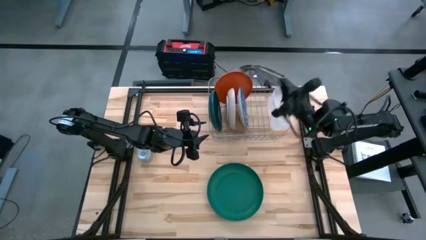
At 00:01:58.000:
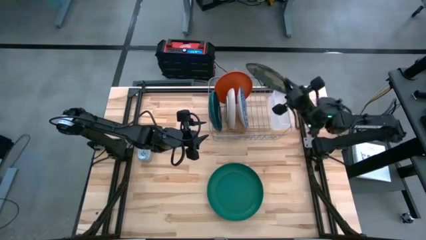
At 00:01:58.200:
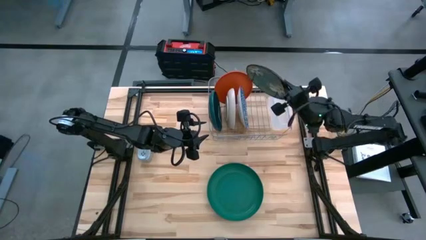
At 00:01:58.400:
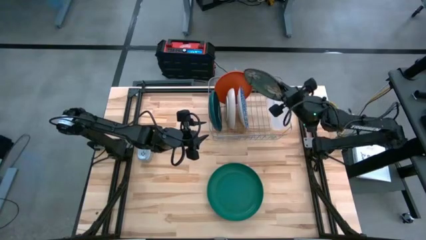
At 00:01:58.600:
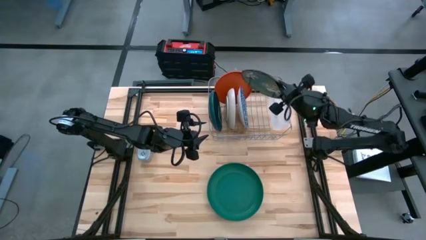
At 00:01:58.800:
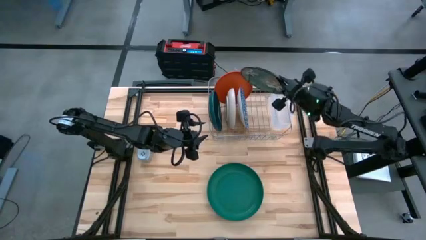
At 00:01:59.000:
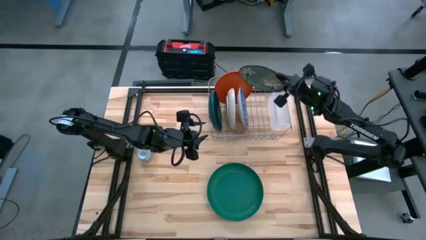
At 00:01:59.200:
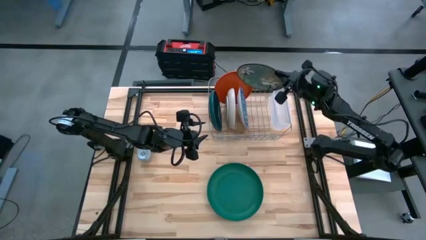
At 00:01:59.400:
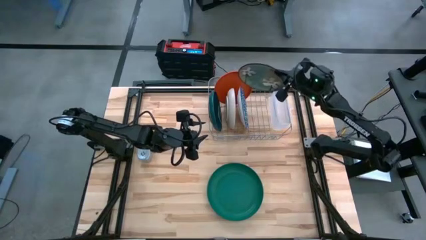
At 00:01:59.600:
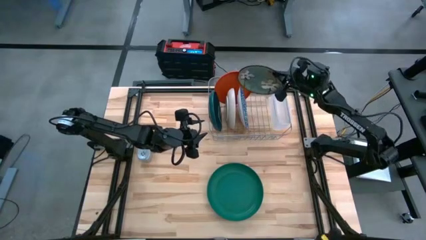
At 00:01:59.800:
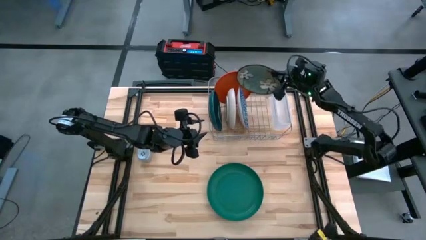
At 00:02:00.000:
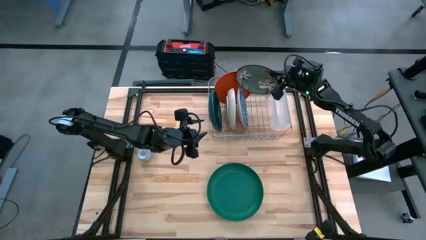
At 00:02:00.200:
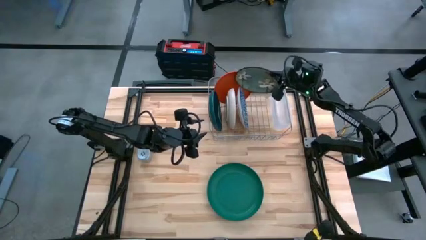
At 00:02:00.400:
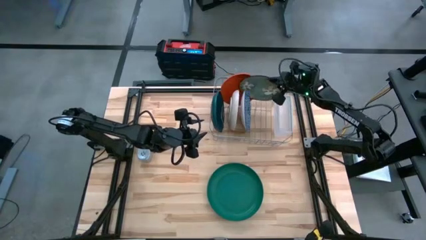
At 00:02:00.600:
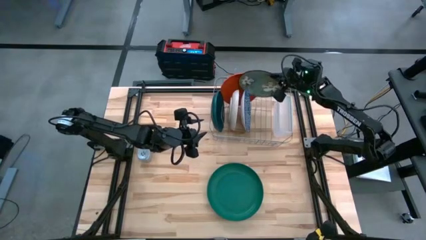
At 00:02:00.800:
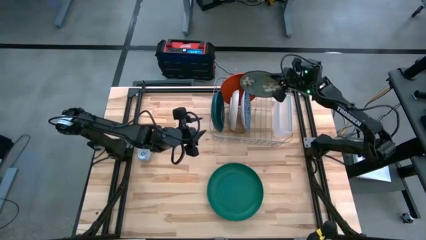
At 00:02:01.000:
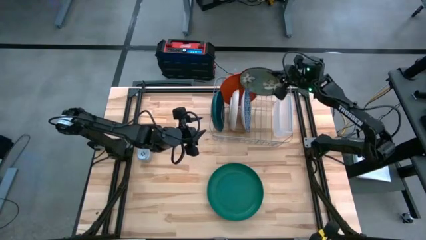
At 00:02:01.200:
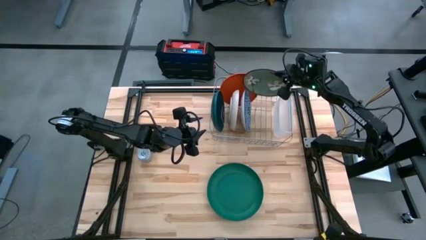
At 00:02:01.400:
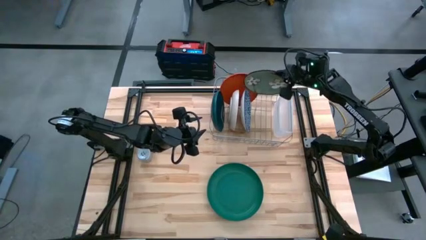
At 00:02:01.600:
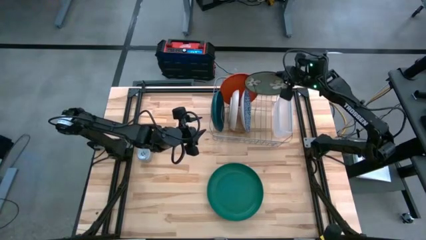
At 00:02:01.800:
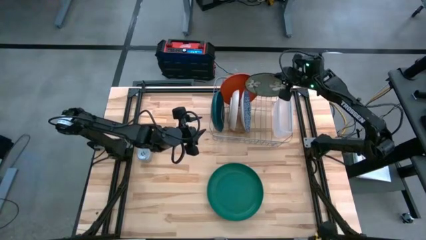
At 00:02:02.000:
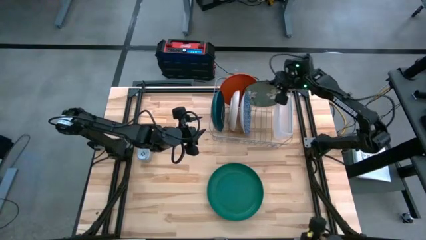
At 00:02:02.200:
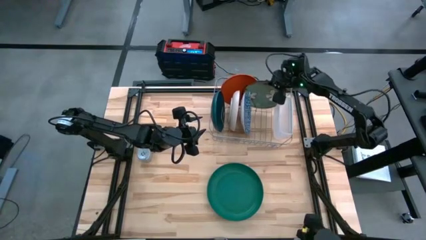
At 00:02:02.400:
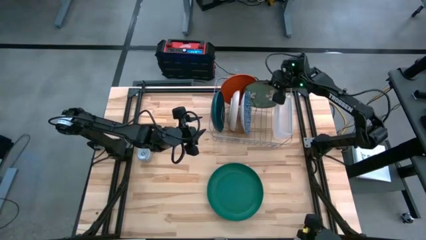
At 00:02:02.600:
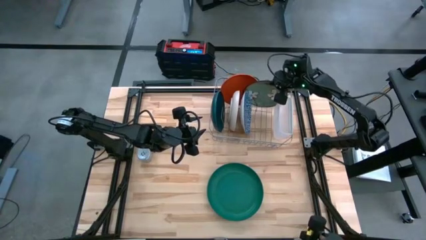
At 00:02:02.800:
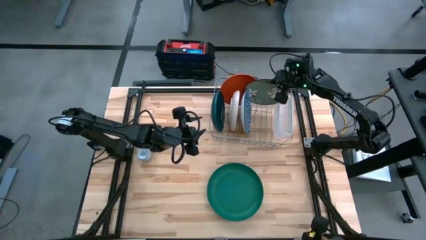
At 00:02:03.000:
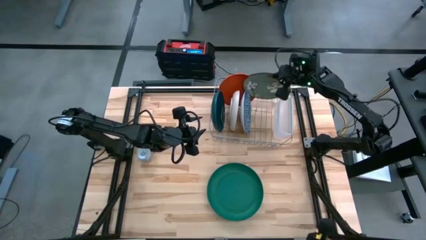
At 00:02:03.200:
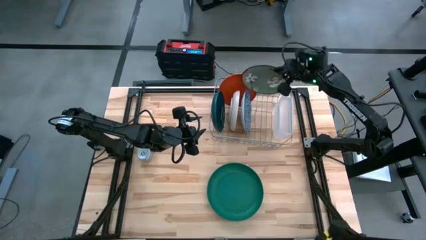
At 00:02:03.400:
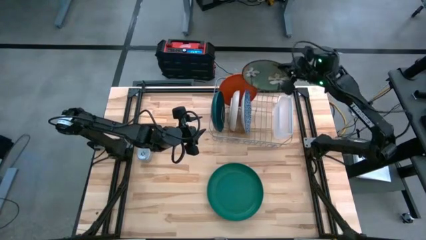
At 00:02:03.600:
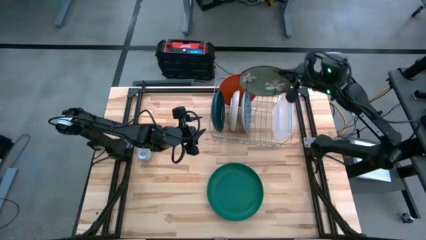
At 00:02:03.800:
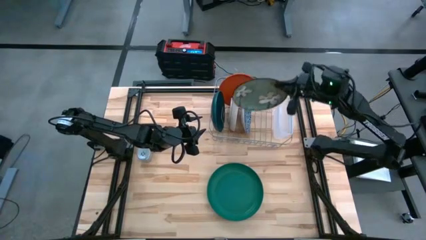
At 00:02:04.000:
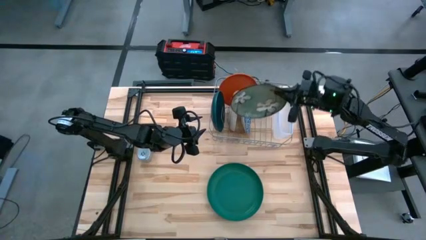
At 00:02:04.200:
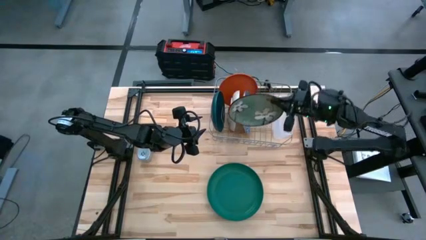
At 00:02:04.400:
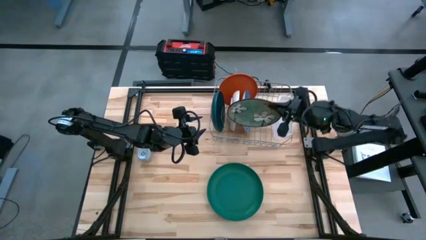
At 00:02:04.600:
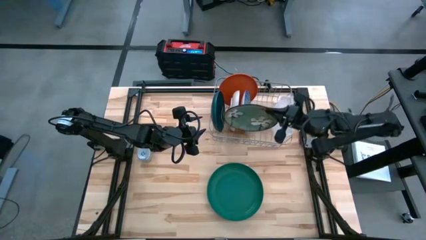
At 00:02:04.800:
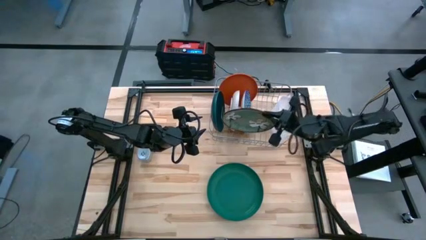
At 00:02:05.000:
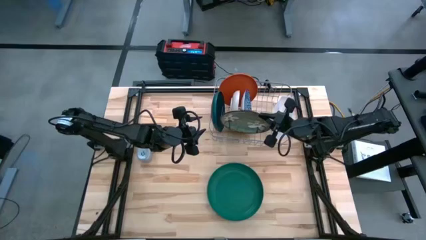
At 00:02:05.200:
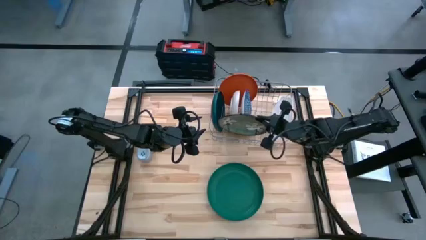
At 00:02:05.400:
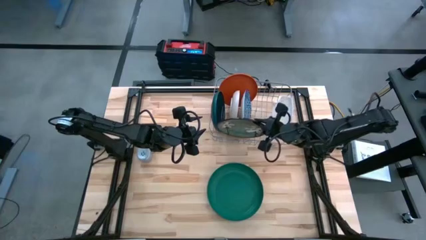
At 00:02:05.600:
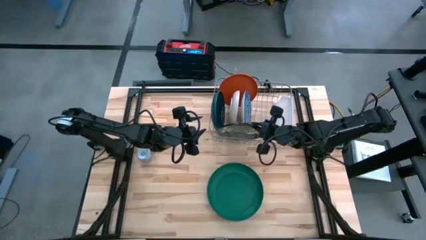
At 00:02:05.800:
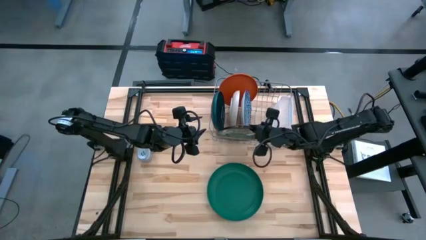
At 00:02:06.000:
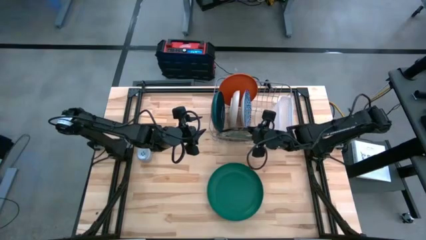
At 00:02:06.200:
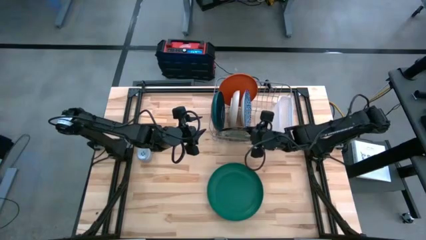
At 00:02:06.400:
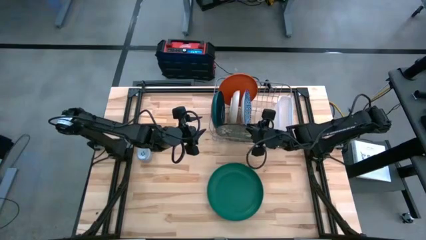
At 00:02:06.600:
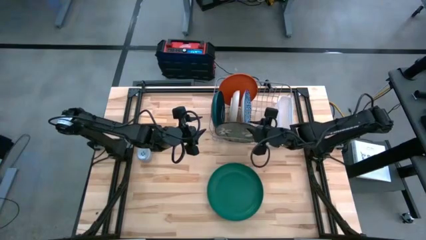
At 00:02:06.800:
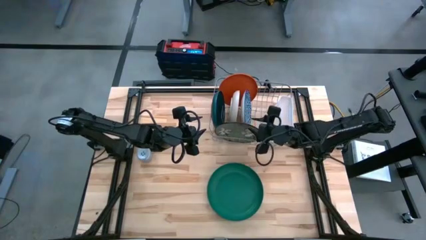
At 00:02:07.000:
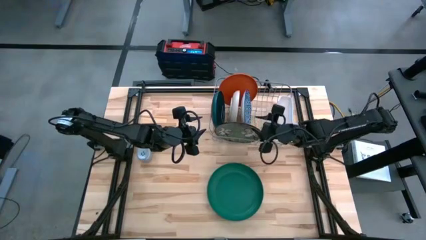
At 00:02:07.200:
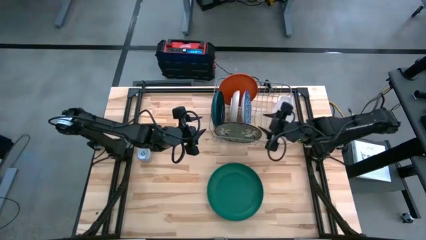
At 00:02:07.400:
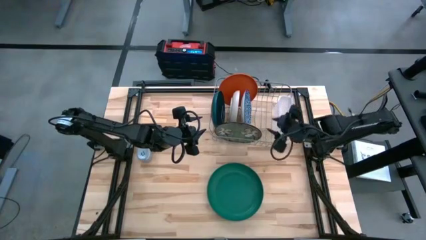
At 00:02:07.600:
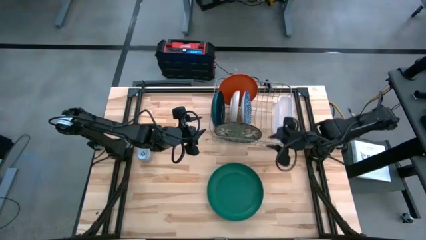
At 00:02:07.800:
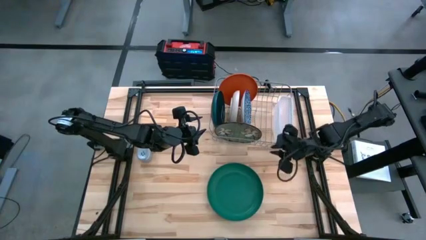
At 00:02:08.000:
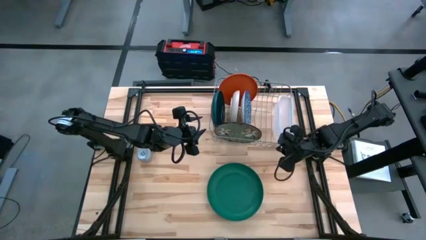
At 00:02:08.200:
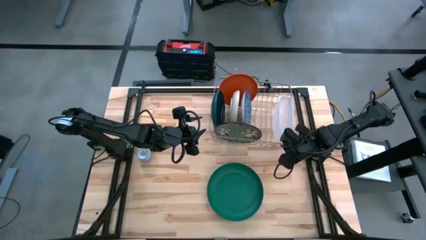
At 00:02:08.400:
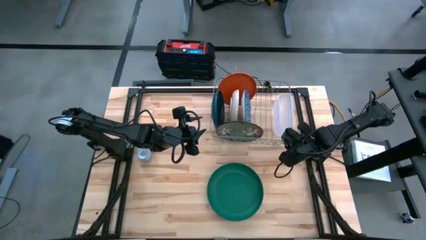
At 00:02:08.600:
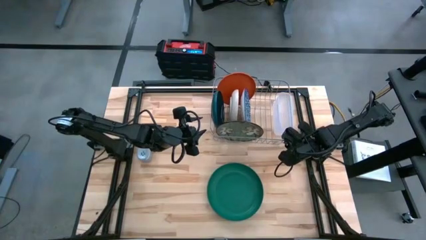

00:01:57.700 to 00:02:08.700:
Task: Sort dishes
Put the green patterned plate in the dish rack

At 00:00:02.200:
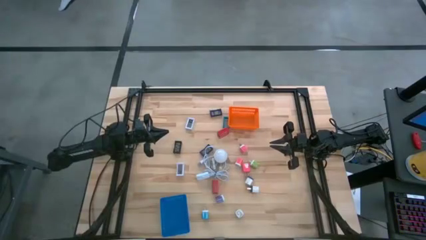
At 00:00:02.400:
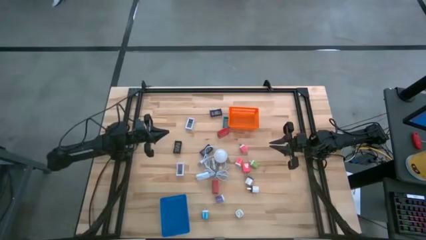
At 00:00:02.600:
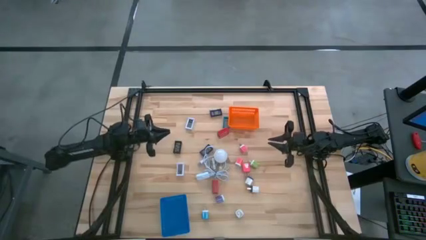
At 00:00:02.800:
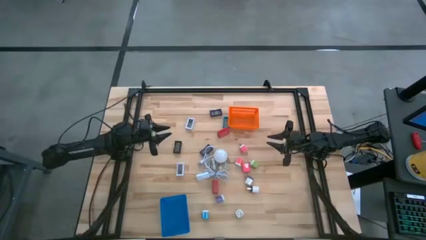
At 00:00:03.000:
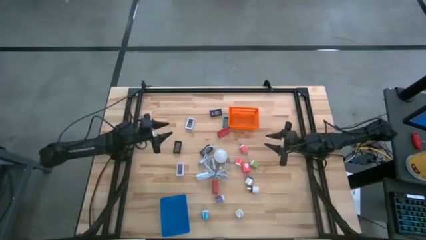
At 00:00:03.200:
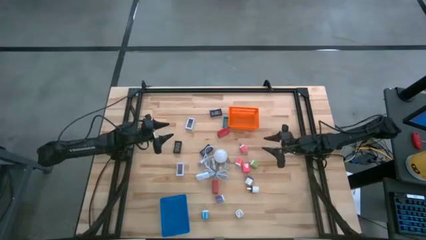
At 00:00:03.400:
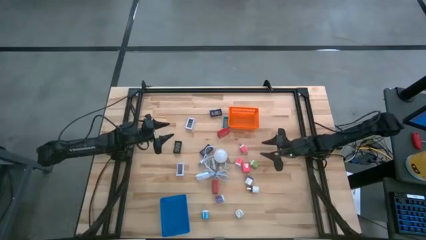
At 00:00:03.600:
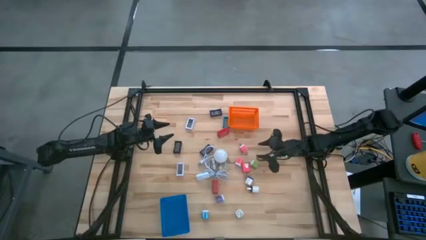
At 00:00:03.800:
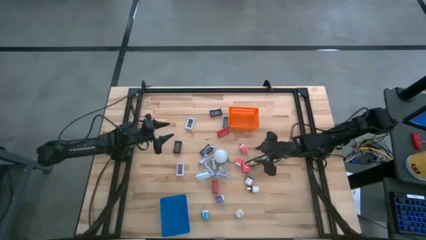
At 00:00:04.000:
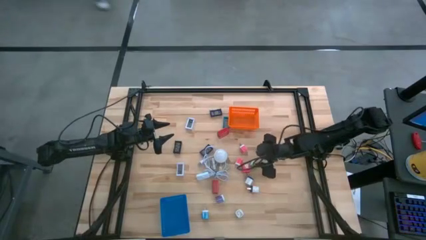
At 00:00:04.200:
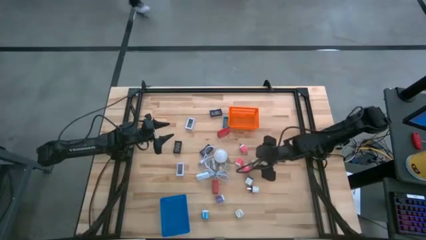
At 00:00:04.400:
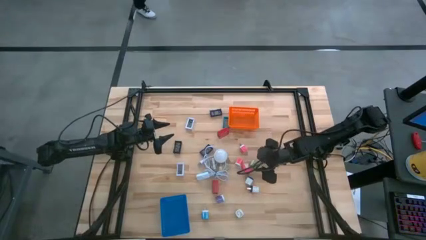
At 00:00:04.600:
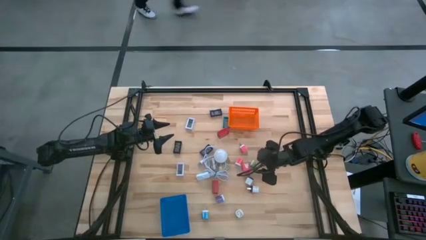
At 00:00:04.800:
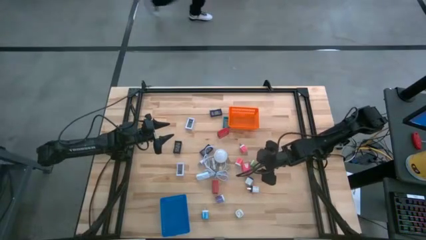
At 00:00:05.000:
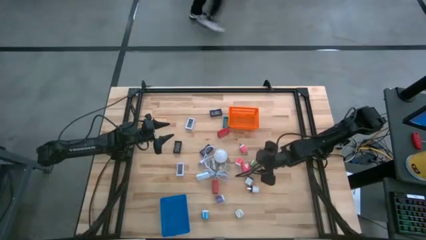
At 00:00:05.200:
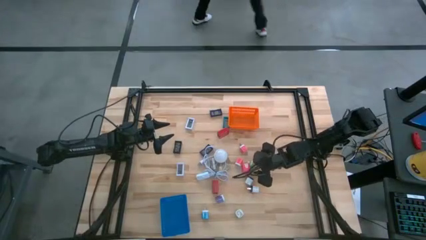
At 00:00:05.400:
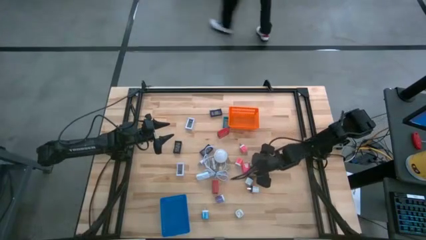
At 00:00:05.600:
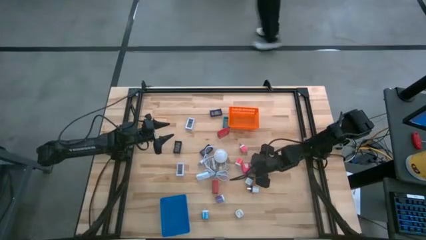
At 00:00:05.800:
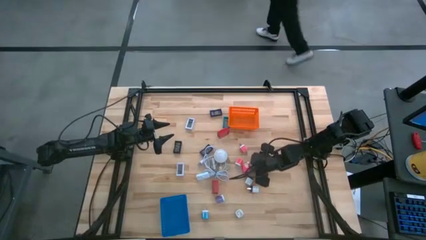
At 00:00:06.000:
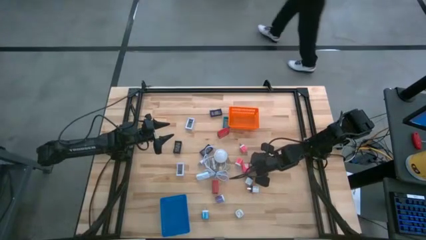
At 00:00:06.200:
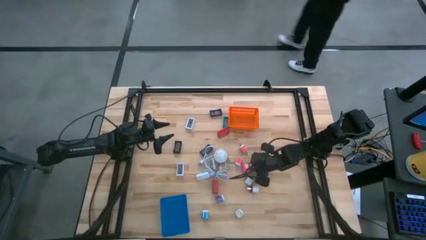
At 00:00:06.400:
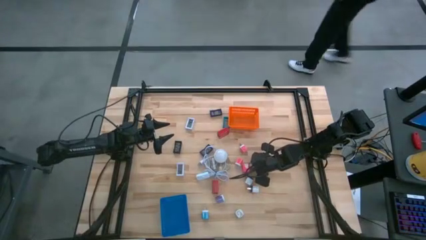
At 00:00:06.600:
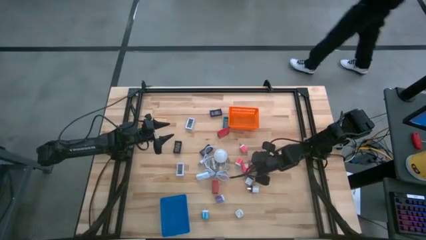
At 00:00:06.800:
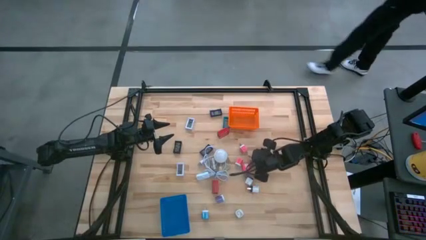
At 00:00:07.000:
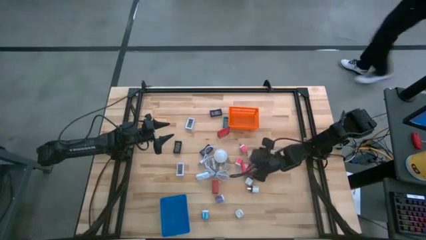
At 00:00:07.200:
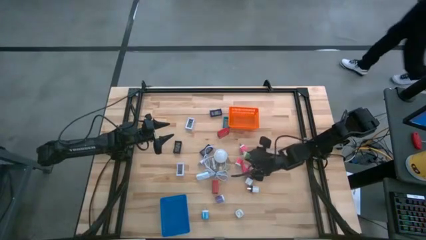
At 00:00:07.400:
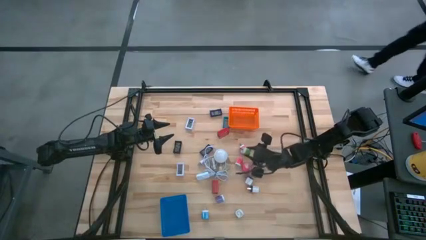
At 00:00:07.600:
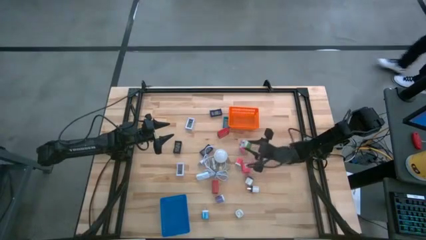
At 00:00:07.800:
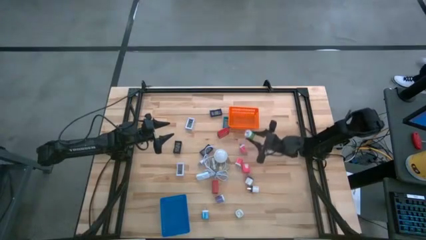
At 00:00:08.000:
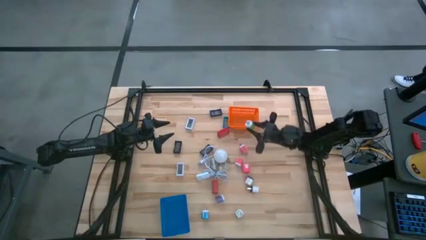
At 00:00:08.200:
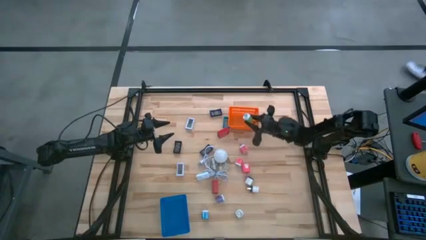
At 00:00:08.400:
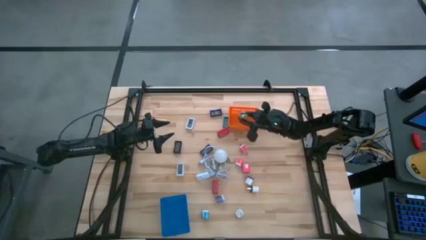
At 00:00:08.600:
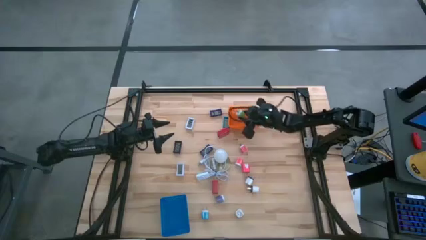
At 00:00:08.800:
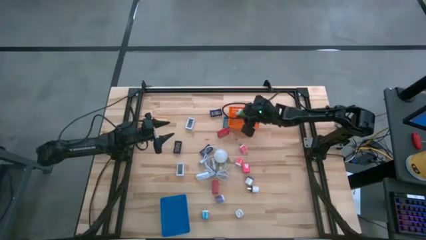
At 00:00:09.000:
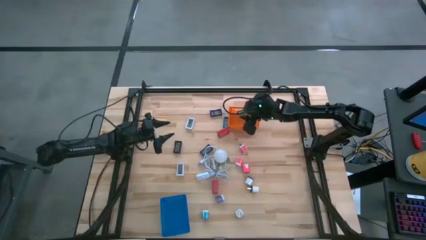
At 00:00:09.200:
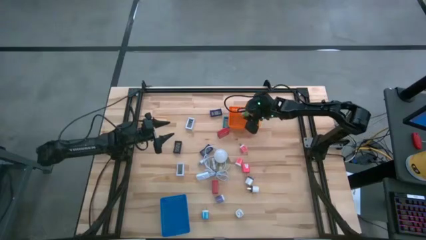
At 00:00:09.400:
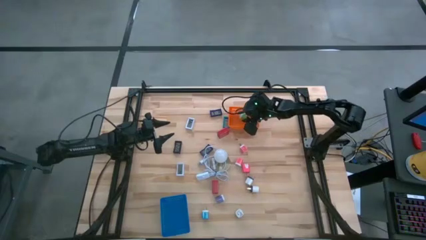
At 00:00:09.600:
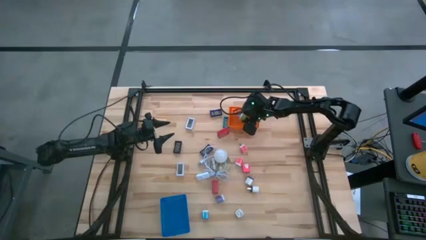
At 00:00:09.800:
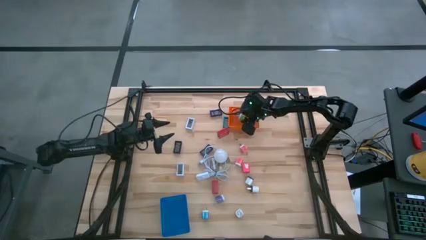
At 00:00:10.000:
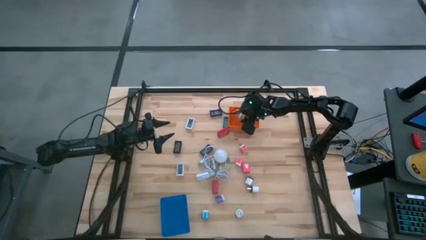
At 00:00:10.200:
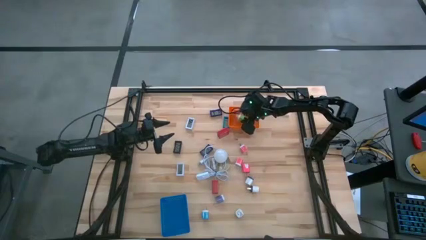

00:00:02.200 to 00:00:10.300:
Task: Pick & Place Office items
Put the top green charger adapter into the orange bin
